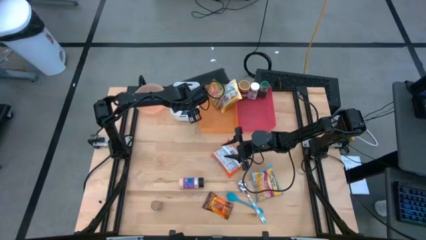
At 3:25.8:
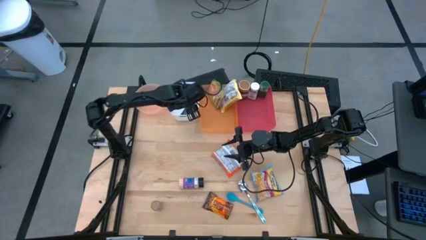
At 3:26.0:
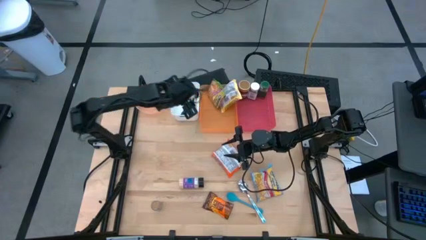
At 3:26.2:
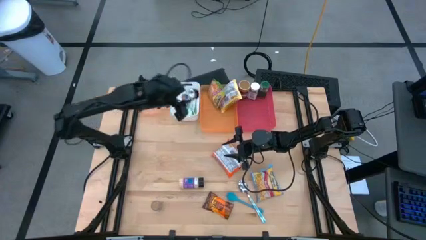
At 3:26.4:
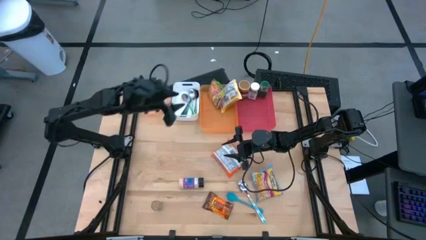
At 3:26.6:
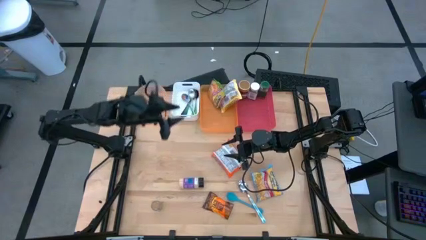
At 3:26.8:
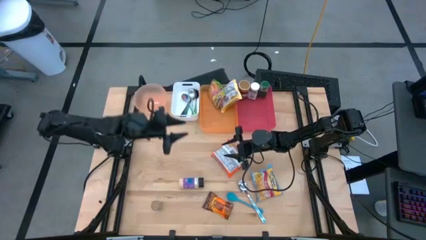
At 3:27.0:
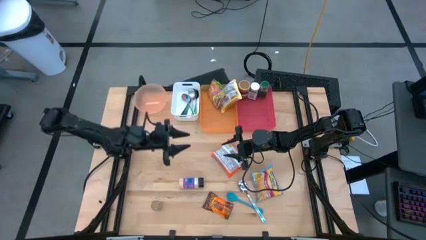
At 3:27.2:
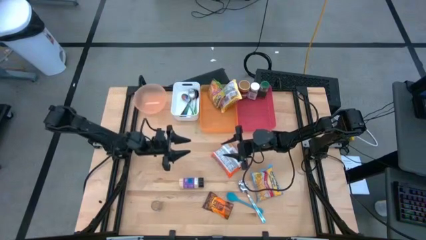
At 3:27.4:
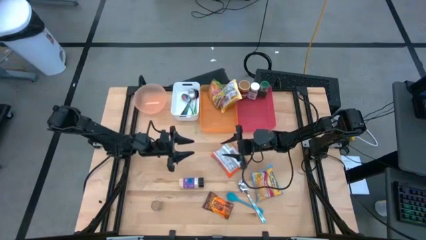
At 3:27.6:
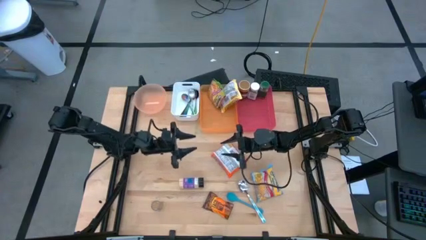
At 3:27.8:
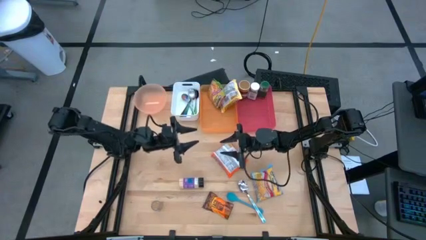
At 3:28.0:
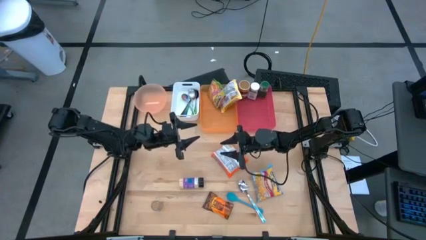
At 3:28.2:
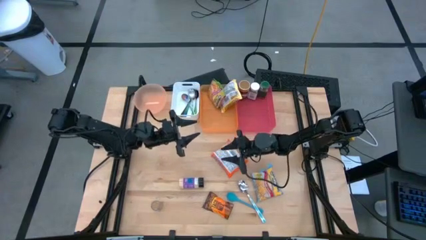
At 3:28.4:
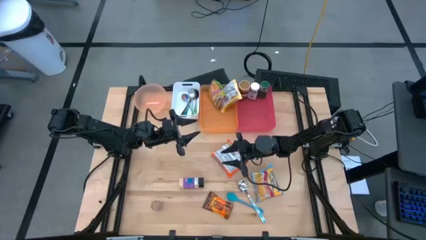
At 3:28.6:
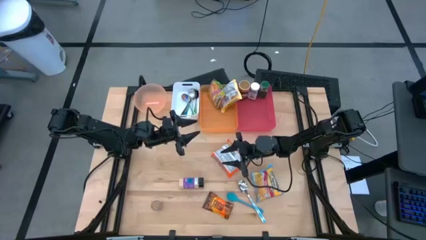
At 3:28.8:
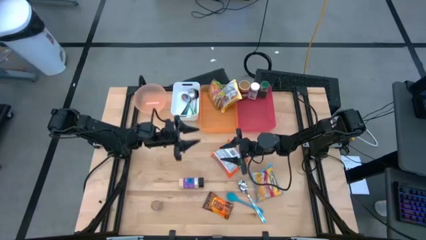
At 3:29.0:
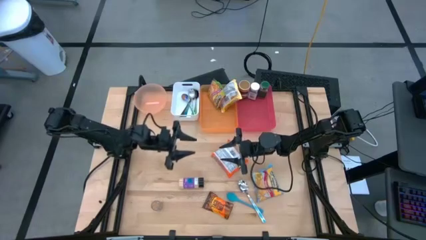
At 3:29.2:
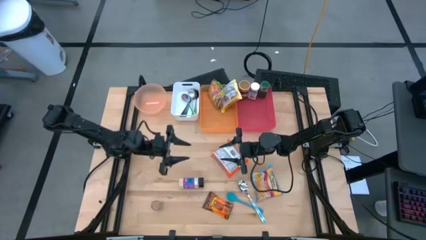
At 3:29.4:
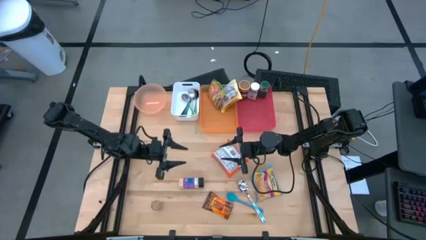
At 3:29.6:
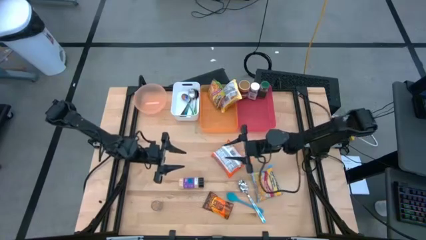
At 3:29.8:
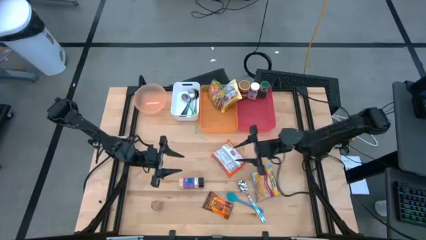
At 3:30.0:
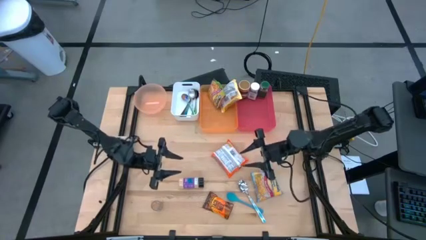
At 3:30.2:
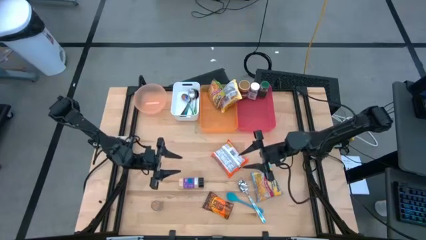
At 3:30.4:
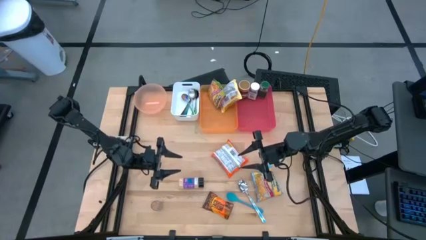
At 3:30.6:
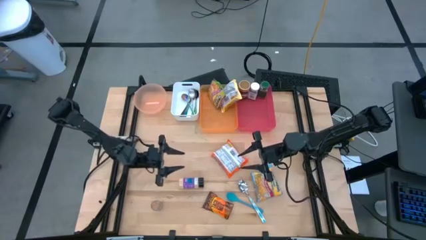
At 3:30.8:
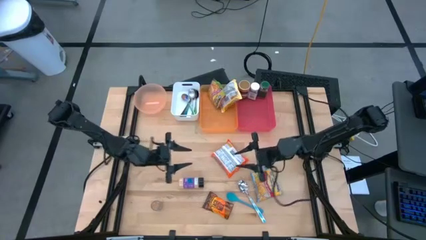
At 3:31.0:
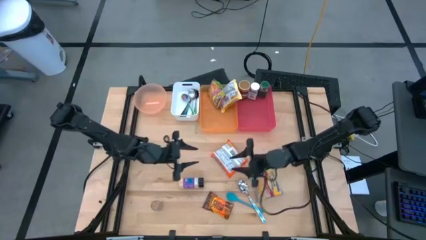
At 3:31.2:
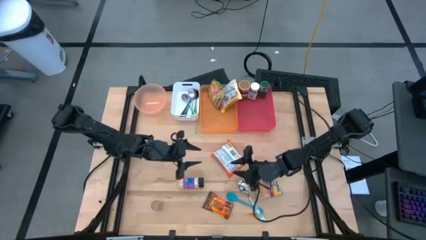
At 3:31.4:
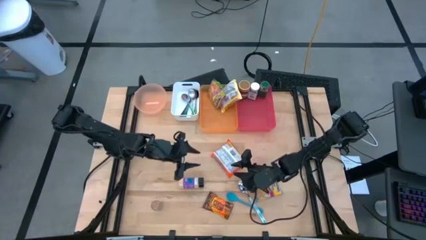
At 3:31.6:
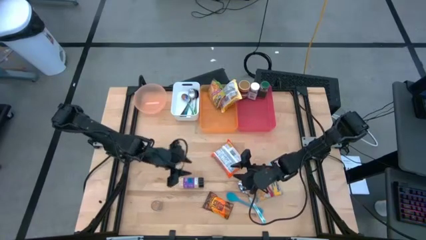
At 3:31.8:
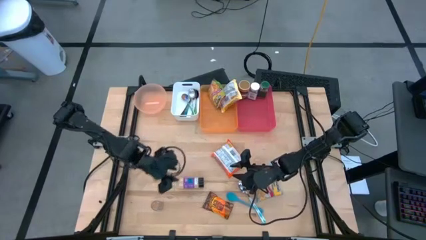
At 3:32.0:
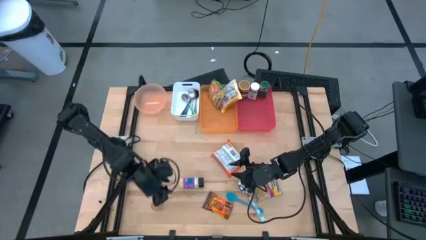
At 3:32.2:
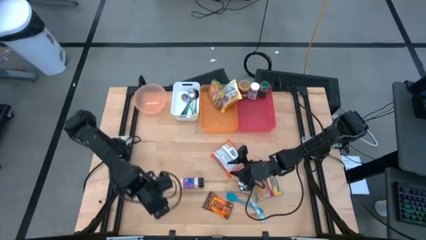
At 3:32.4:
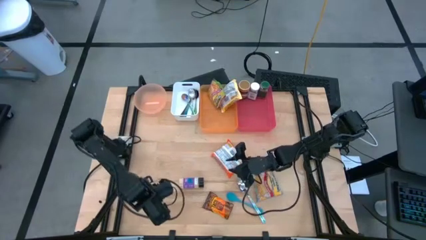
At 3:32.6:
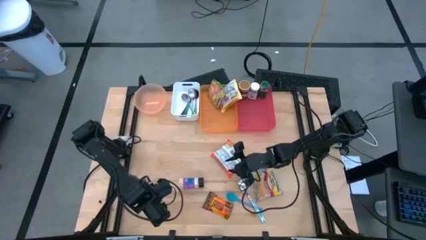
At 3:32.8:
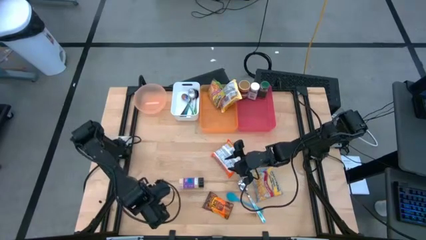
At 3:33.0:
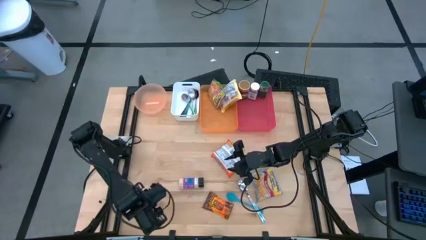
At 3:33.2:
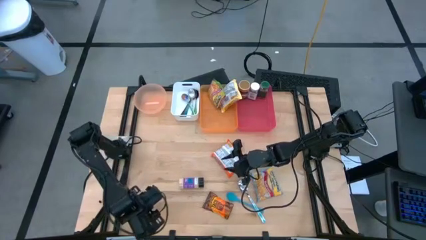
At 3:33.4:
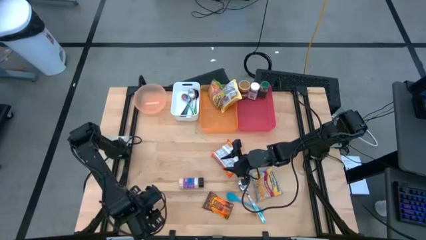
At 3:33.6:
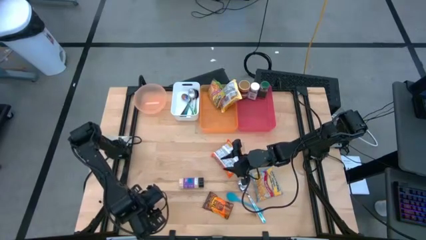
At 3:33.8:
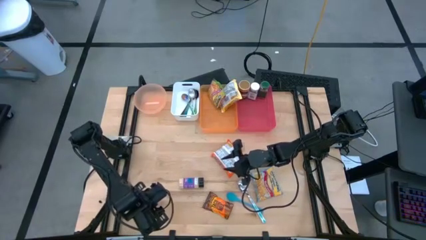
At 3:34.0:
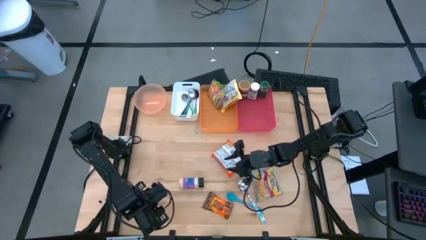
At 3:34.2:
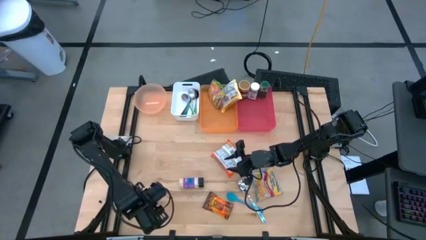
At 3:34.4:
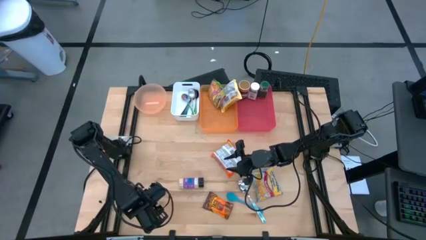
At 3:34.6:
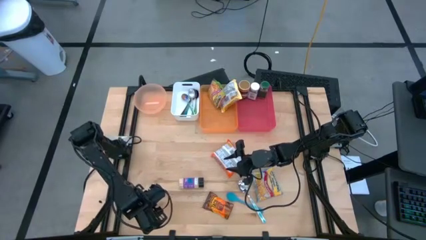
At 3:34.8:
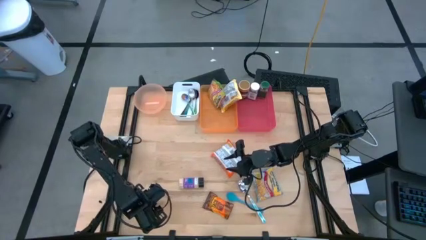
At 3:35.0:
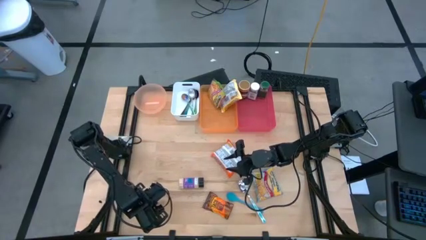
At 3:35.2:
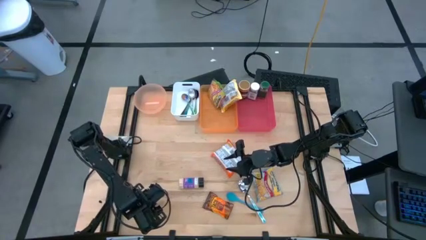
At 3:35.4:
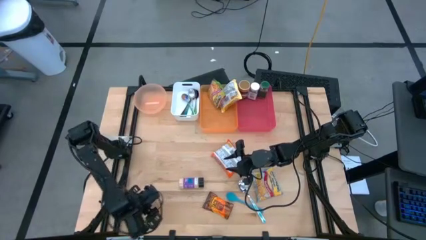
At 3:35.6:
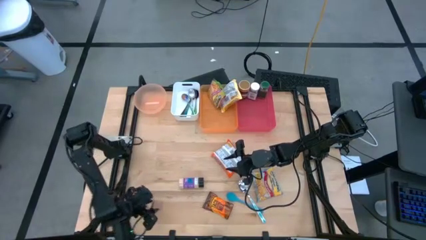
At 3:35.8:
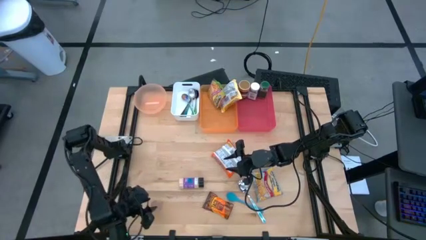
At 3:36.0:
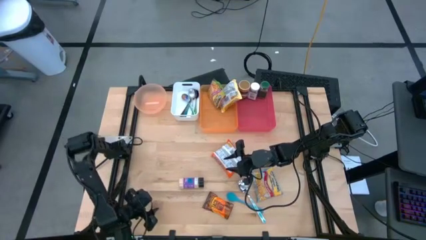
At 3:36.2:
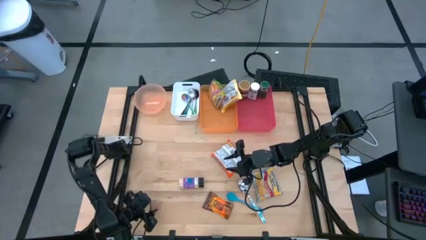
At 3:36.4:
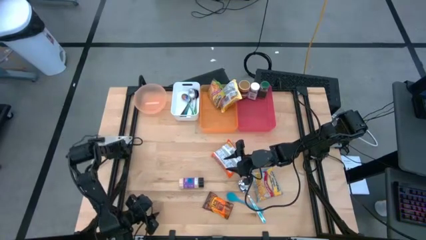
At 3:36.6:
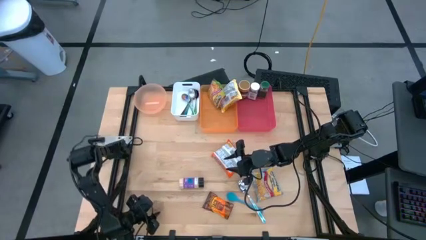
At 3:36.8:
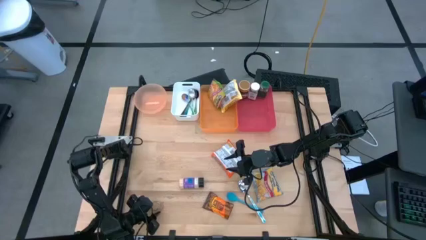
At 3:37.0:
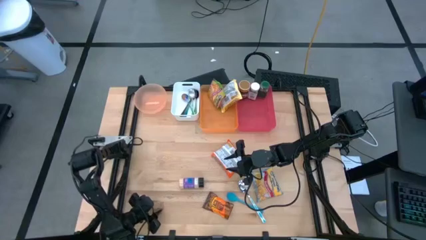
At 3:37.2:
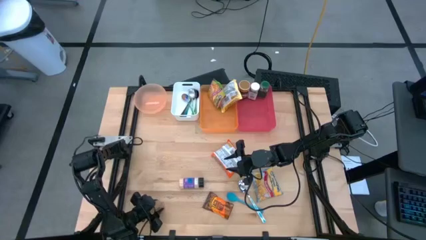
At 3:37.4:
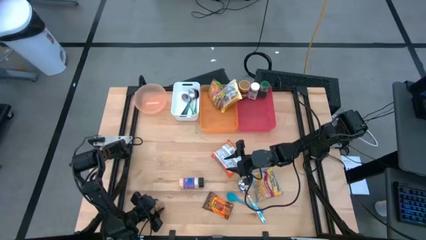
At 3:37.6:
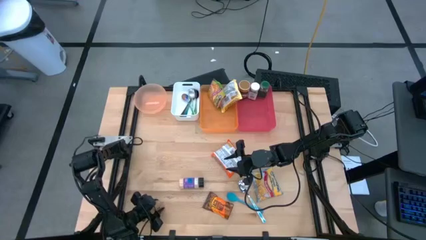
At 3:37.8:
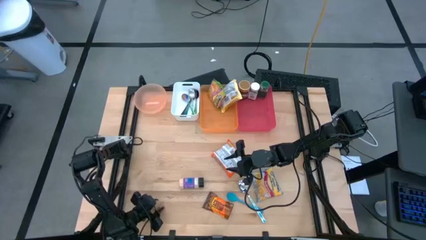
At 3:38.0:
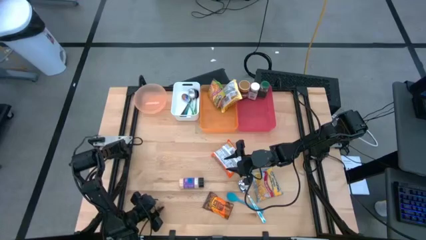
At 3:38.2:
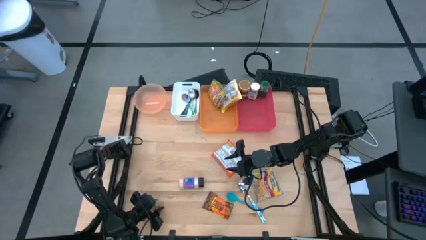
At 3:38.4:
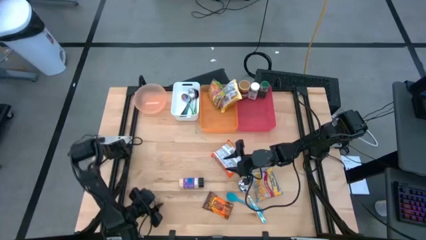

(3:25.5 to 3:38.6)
Task: Pick & Place Food Item
Put the brown seasoning bottle into the red bin

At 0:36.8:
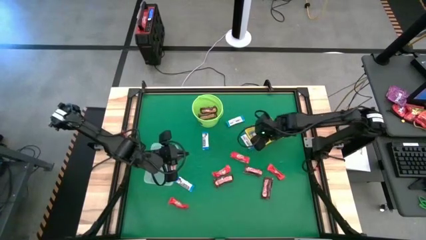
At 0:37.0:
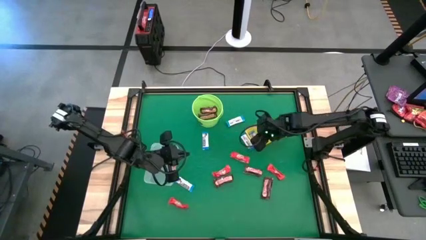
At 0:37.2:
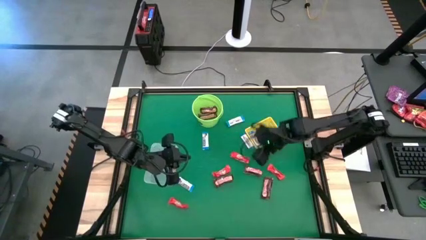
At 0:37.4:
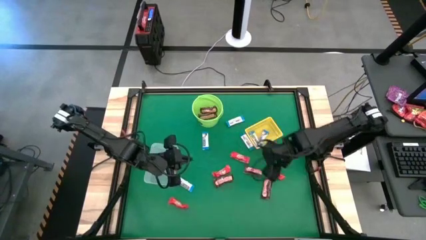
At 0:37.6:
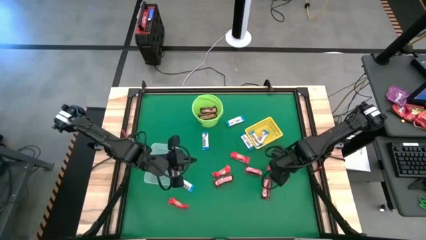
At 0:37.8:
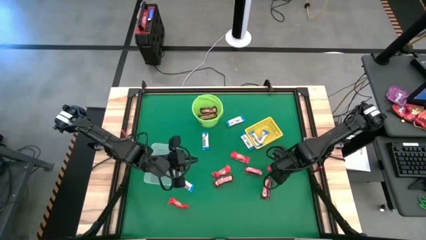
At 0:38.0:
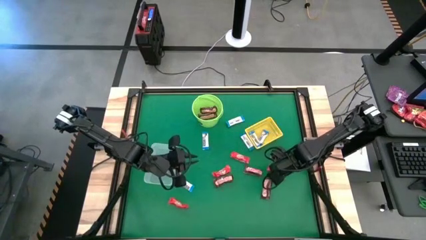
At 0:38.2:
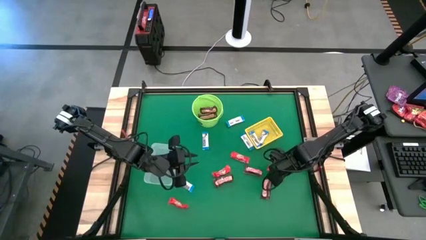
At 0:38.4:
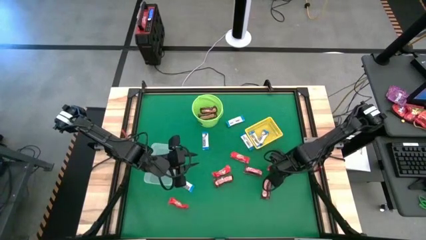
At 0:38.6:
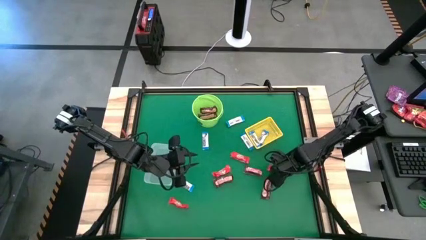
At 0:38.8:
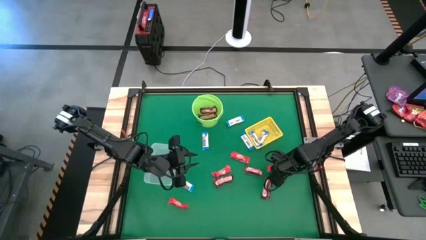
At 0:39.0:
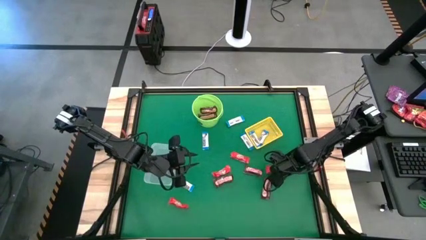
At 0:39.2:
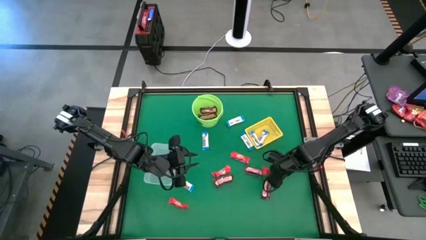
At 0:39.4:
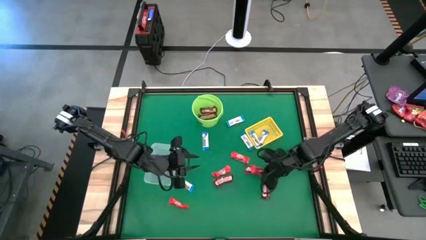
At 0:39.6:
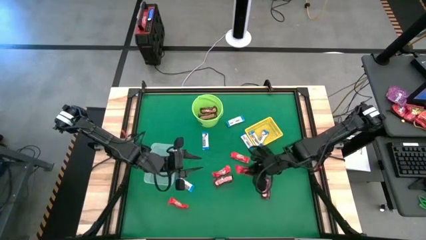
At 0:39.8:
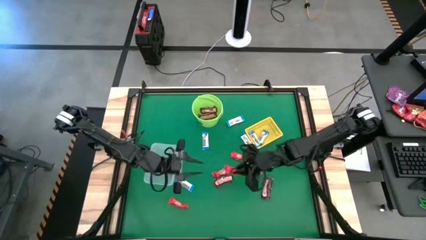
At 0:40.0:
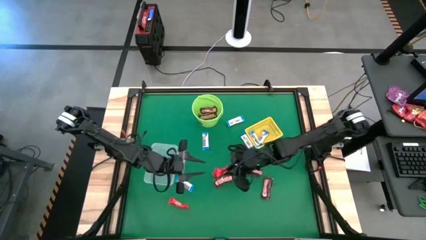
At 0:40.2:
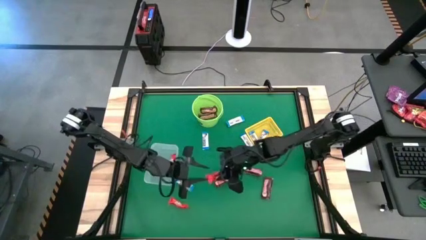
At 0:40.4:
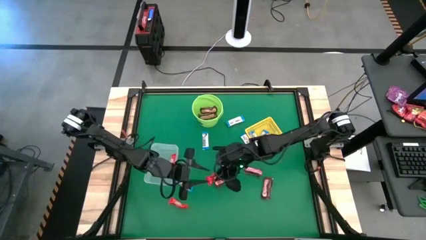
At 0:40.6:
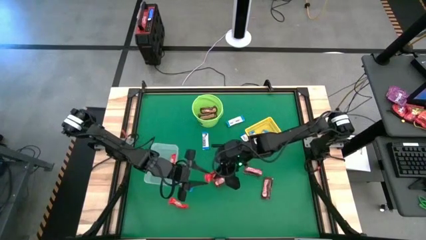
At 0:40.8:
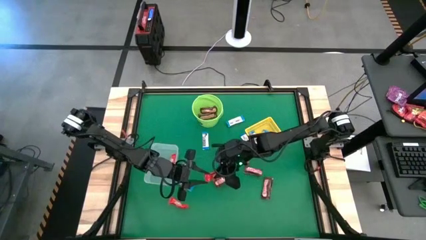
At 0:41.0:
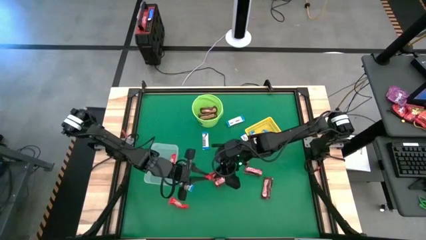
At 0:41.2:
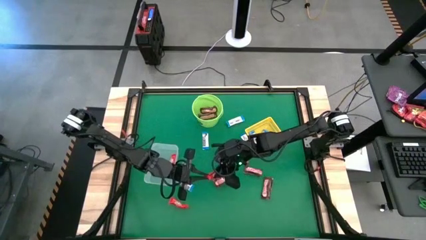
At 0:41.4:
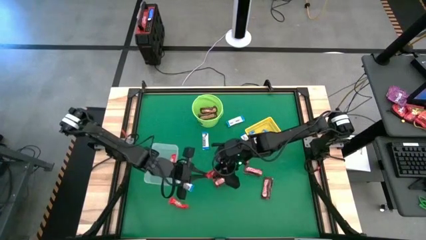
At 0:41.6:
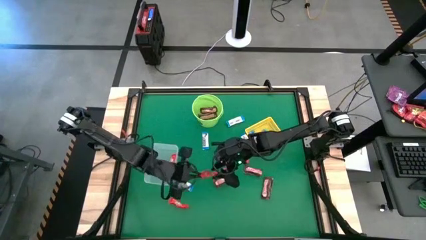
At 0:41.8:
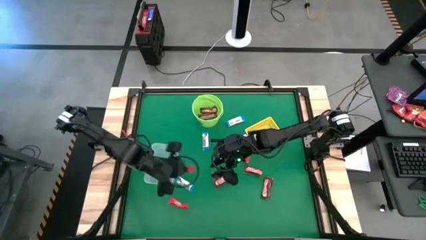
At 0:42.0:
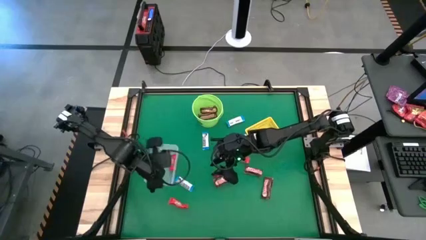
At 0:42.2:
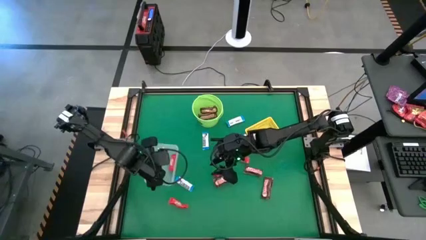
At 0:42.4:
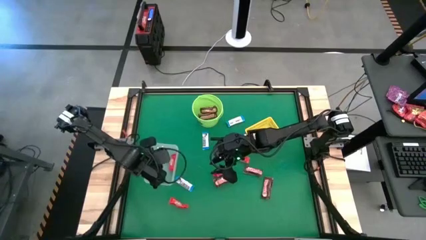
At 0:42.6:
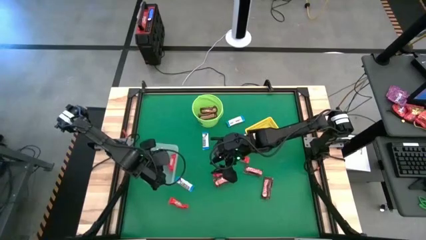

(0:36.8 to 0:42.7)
Task: Sort candy by brand, put in halloween buckets
Put the red chocolate bar into the transparent bin
